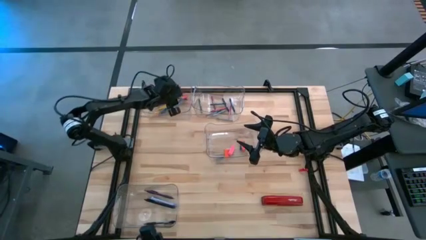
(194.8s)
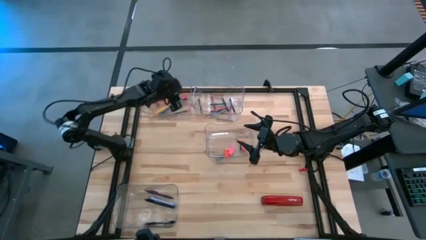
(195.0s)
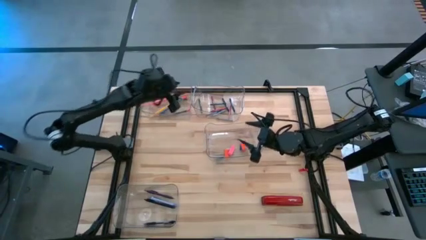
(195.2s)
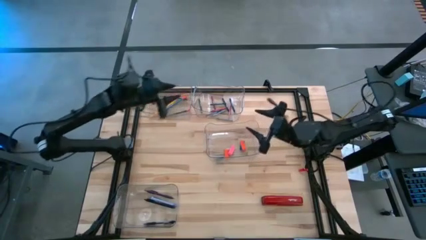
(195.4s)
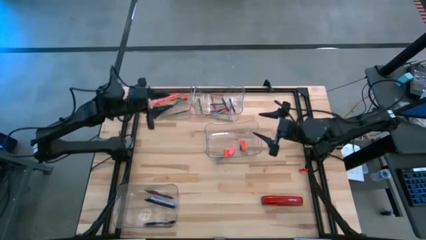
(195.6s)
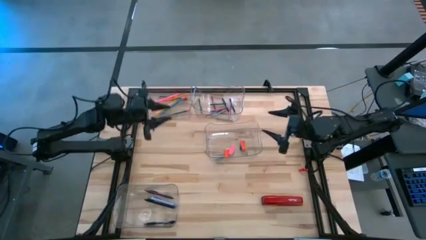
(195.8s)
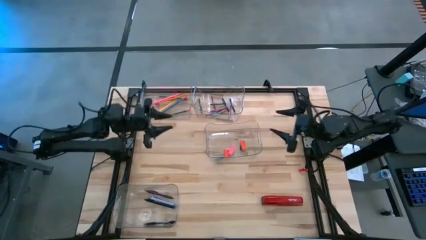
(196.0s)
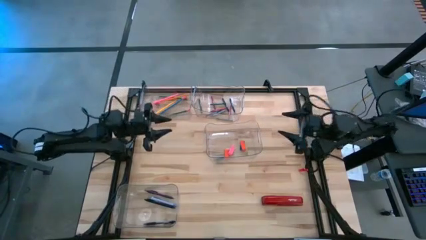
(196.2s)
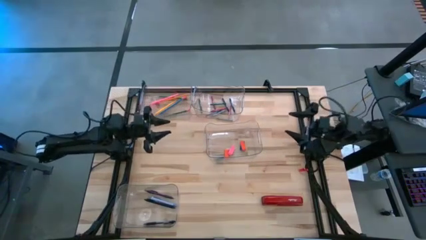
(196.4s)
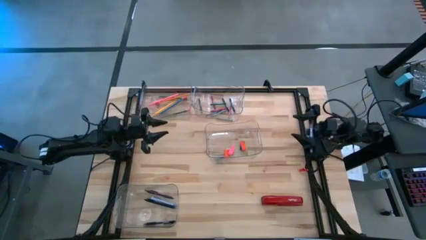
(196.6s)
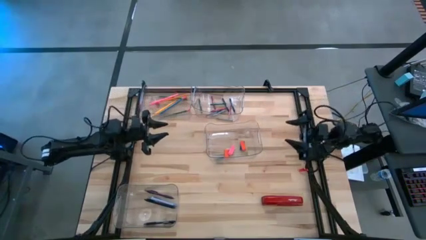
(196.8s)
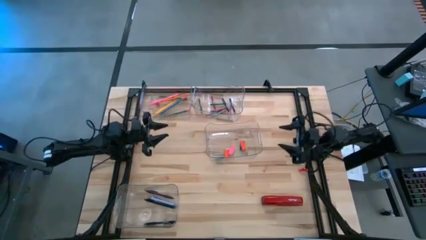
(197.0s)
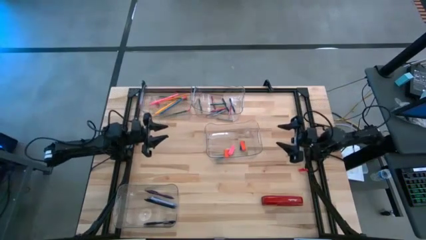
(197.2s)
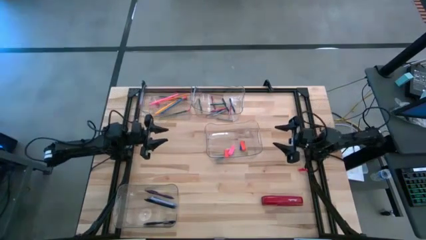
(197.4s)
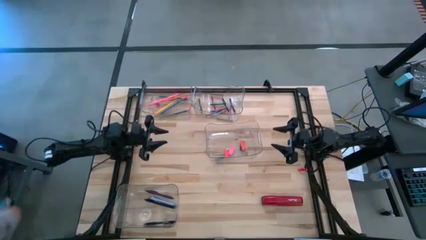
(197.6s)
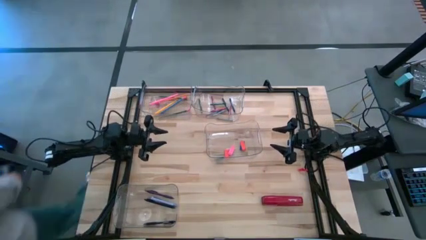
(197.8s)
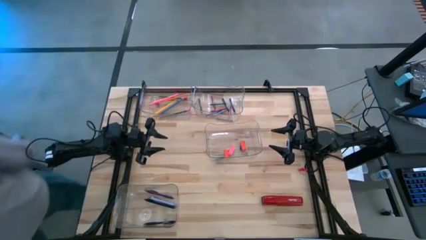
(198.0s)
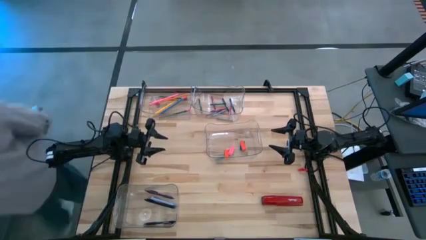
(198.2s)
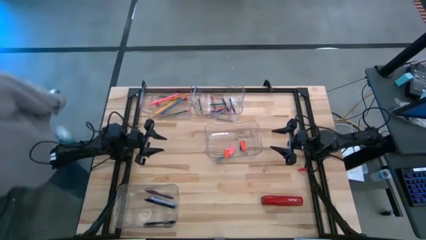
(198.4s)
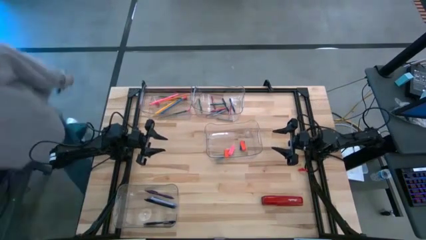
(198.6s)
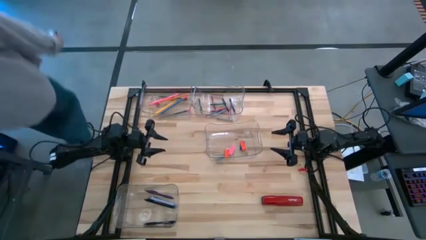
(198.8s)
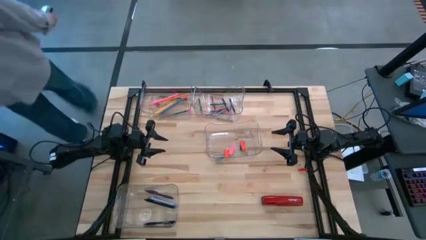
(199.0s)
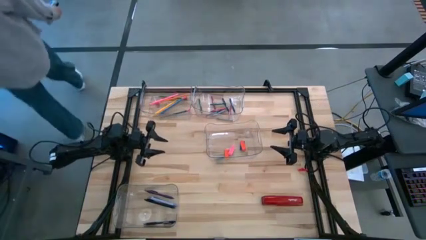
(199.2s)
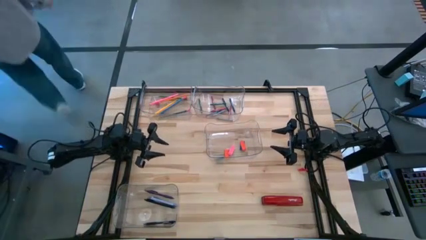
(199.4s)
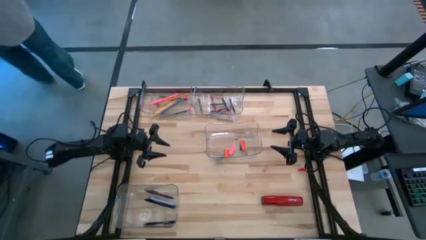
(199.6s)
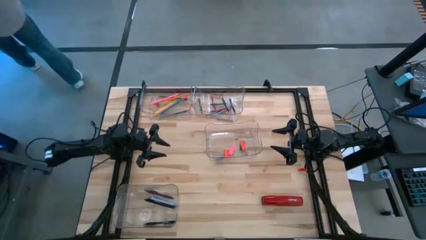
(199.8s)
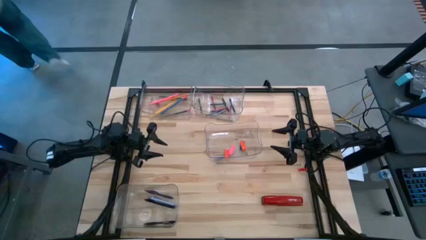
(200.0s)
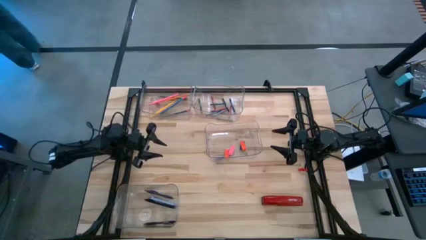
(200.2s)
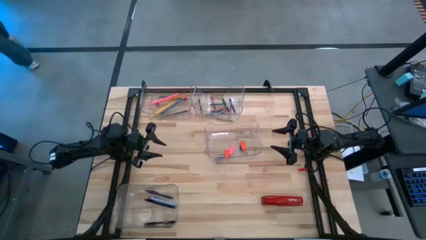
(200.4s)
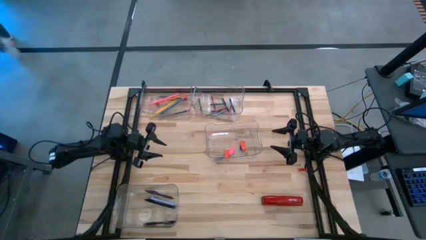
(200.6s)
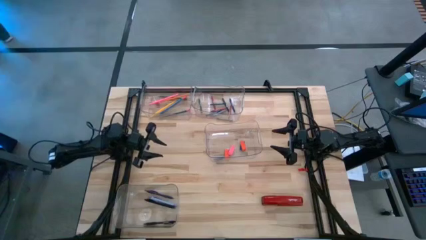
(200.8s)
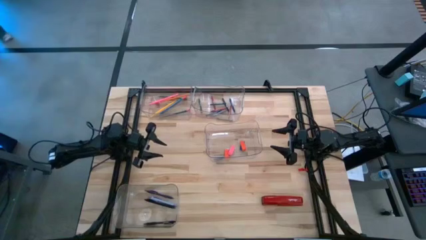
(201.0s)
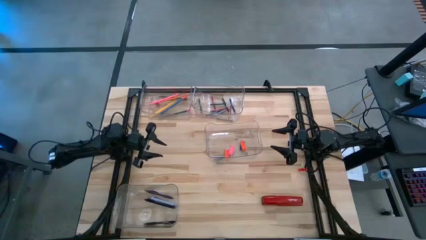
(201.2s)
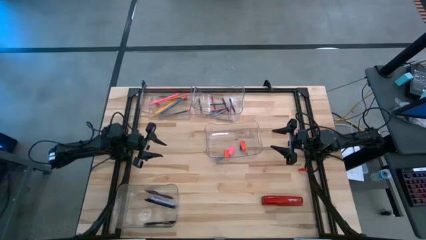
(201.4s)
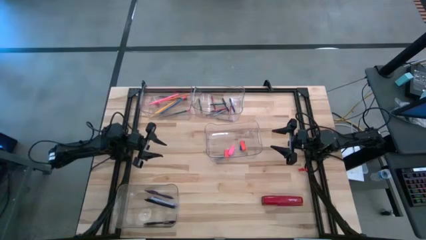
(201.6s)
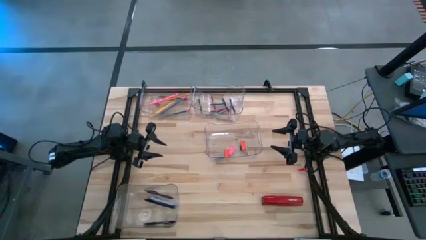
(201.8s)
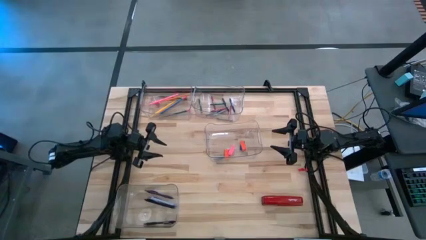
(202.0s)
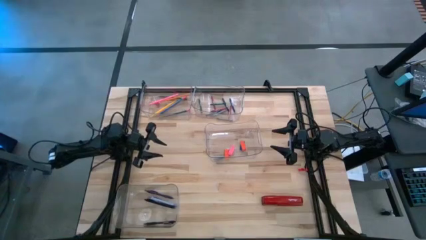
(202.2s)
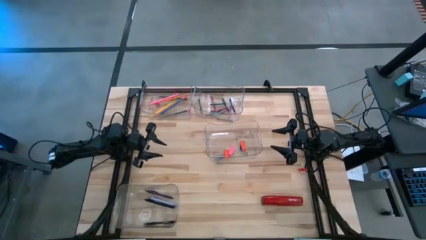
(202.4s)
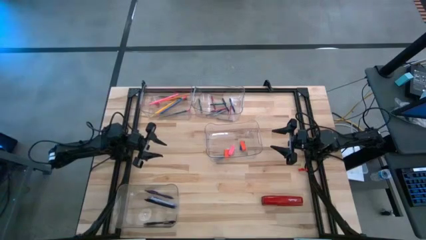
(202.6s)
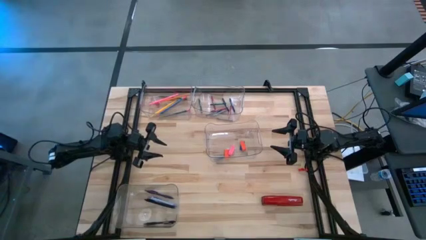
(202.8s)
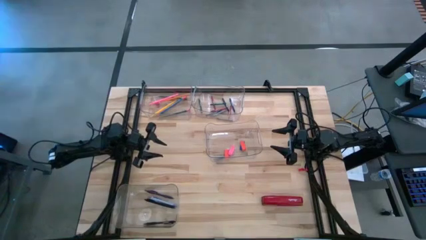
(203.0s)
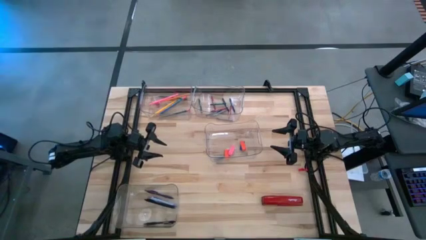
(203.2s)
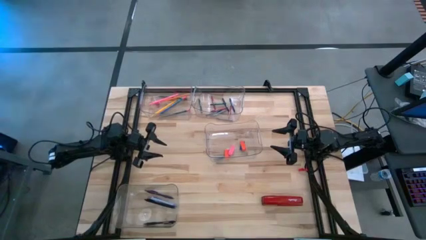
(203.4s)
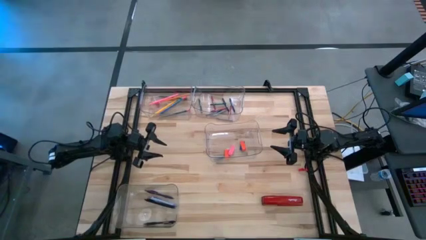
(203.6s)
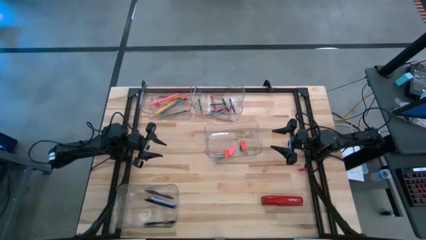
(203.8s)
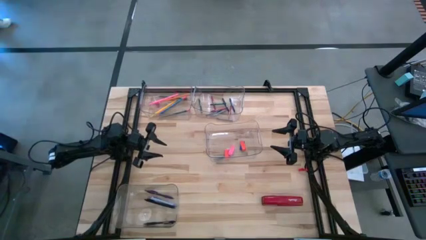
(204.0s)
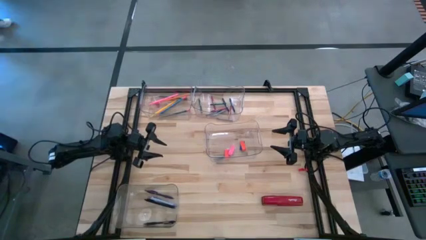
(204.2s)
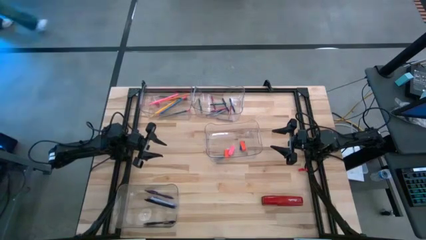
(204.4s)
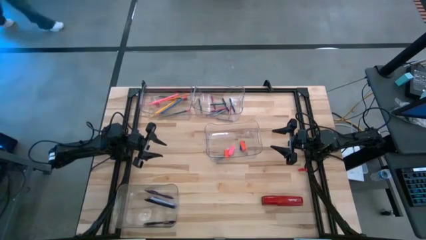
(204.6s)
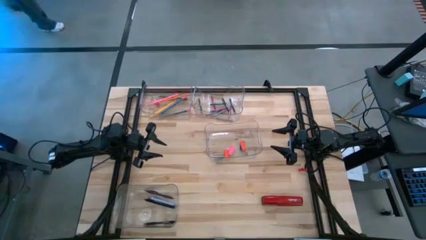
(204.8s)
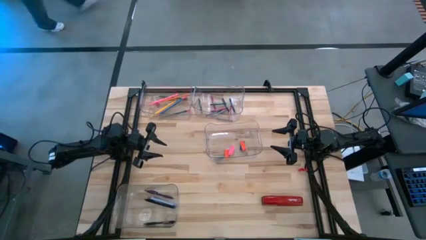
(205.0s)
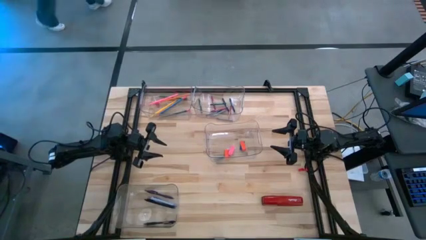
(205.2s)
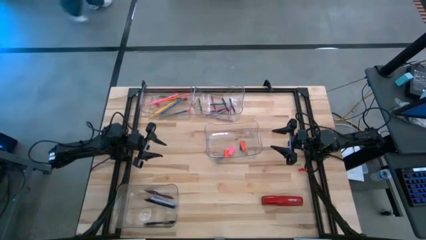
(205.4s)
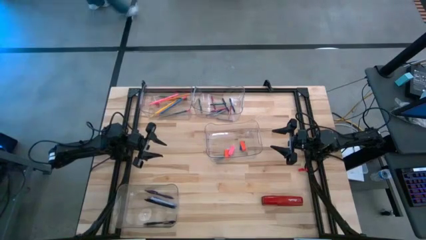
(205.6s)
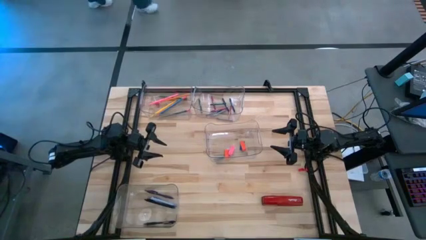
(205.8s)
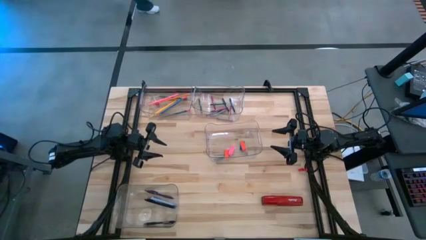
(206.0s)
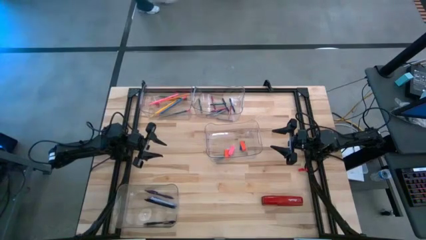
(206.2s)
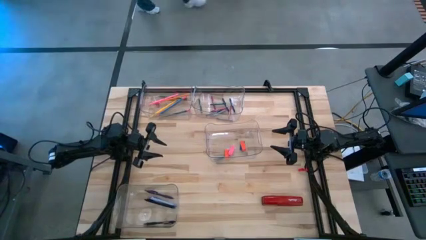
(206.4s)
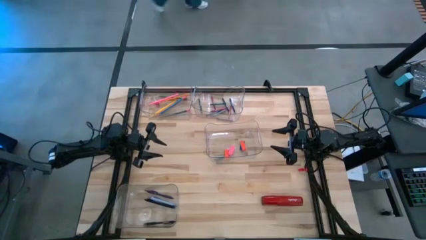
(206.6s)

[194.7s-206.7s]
Task: Sort crayons/erasers/pens/pencils in bins
Return to Home Position
